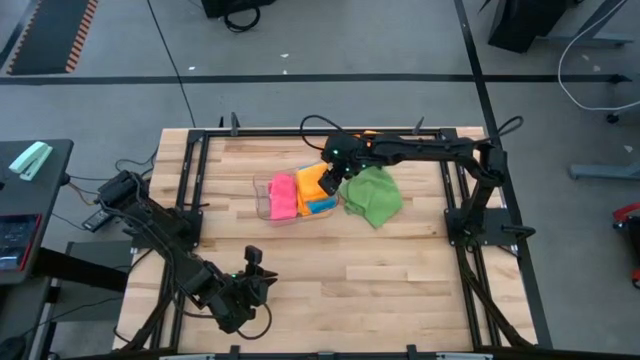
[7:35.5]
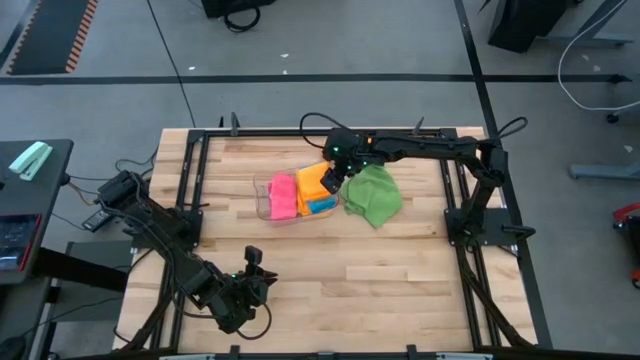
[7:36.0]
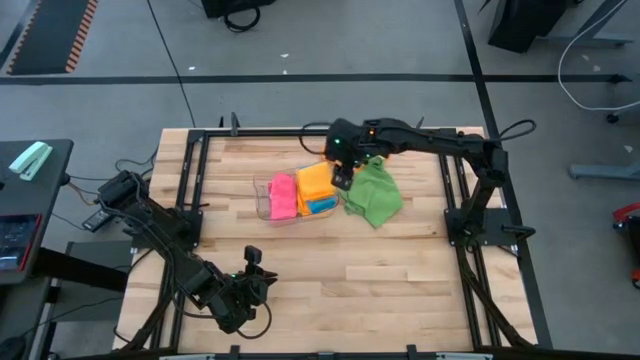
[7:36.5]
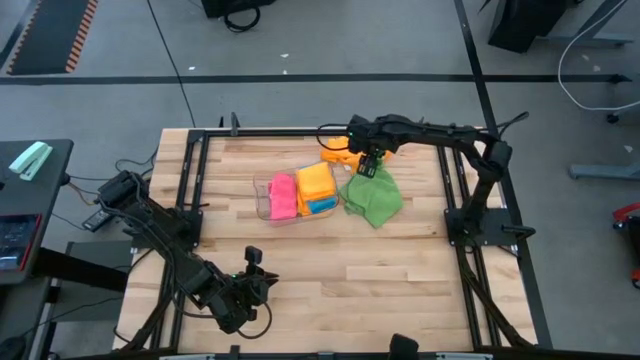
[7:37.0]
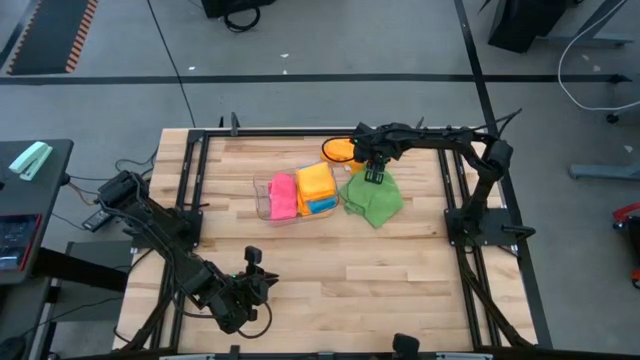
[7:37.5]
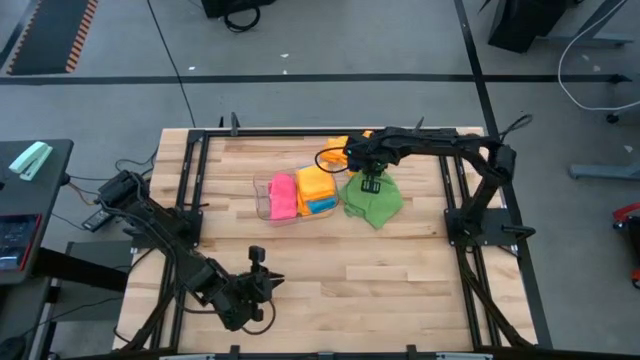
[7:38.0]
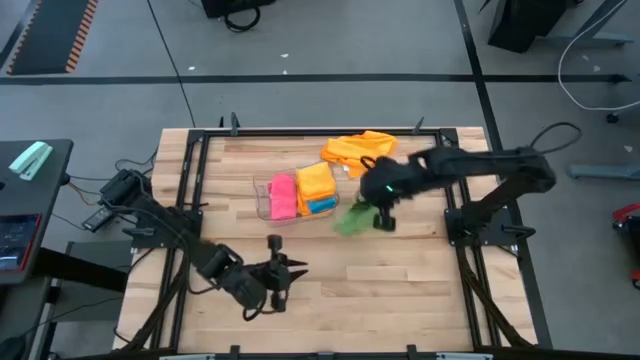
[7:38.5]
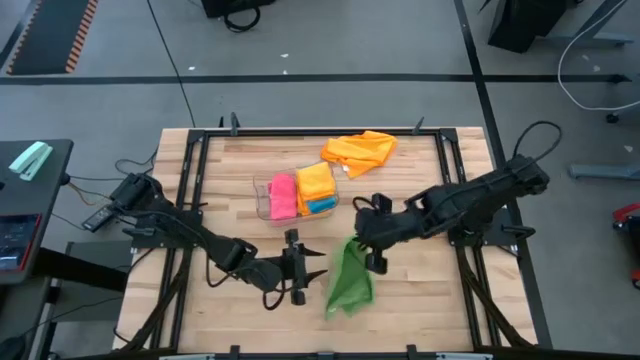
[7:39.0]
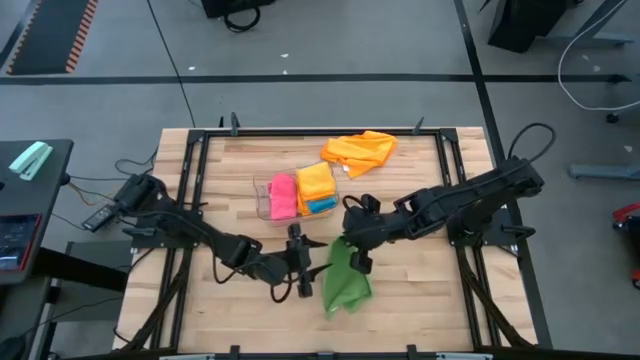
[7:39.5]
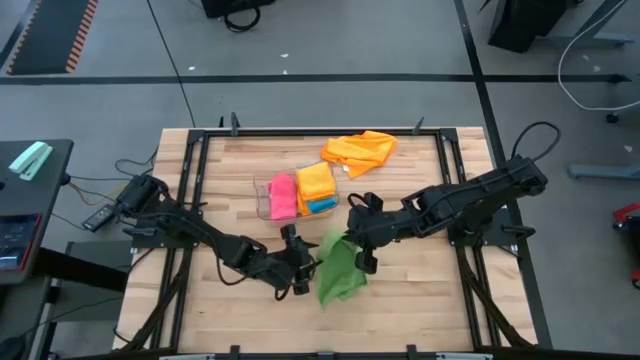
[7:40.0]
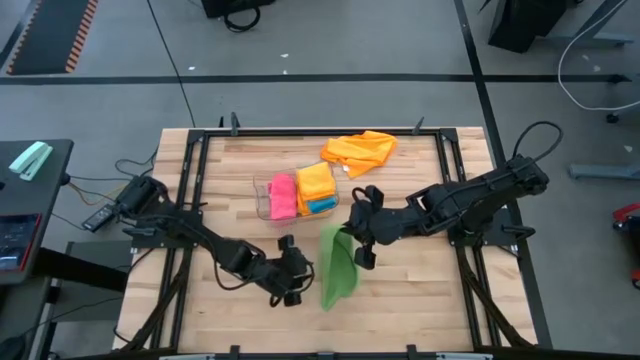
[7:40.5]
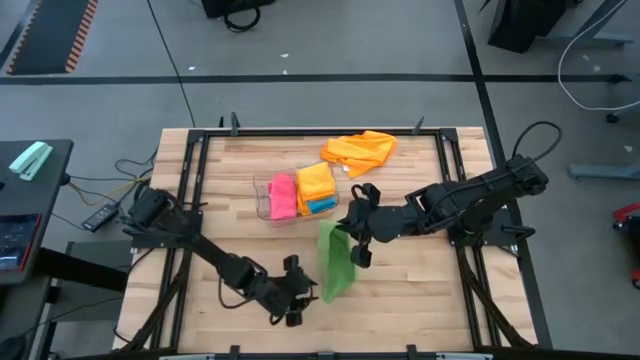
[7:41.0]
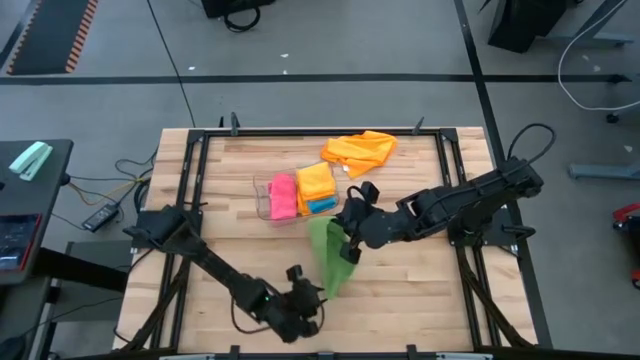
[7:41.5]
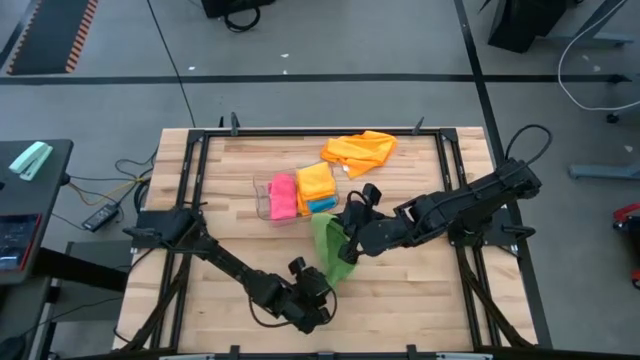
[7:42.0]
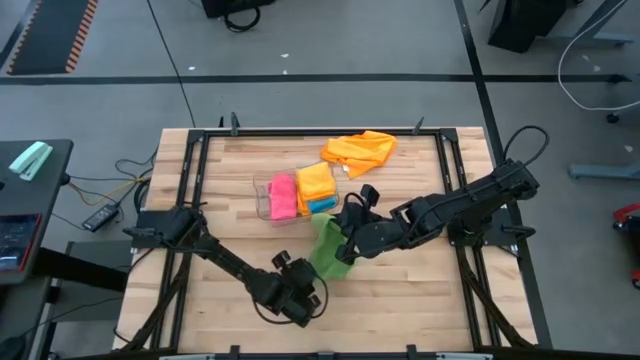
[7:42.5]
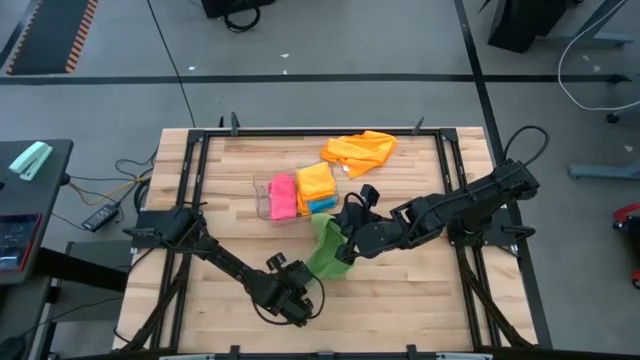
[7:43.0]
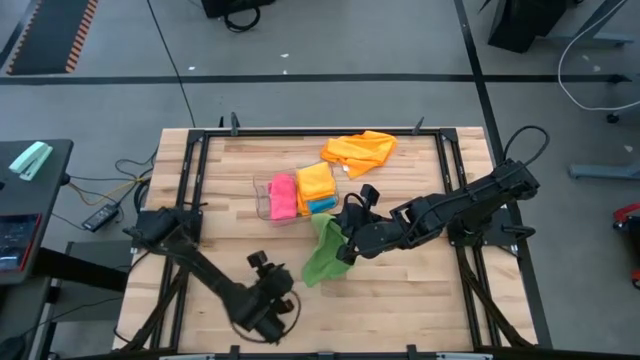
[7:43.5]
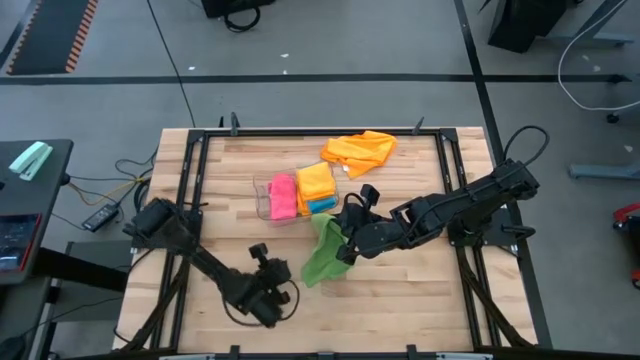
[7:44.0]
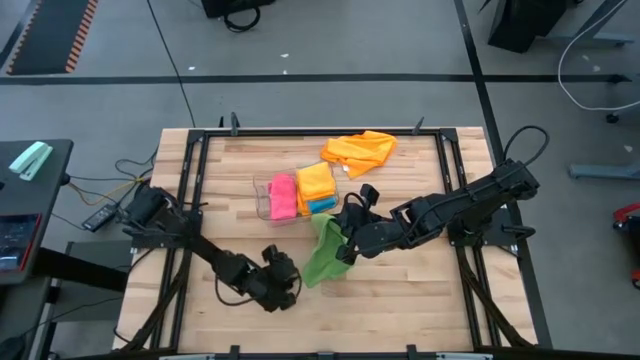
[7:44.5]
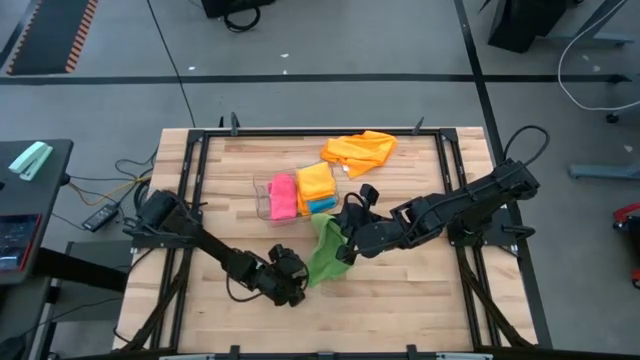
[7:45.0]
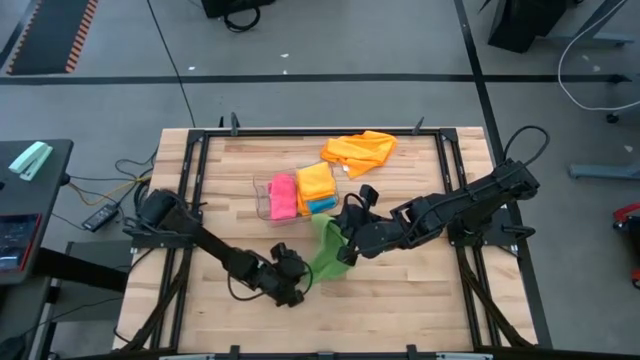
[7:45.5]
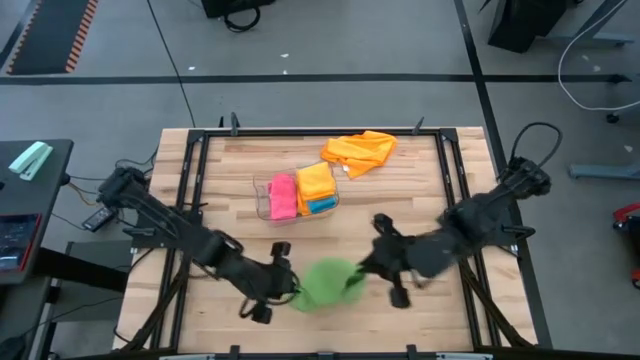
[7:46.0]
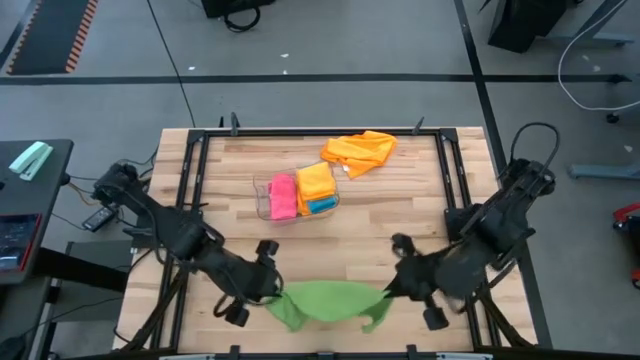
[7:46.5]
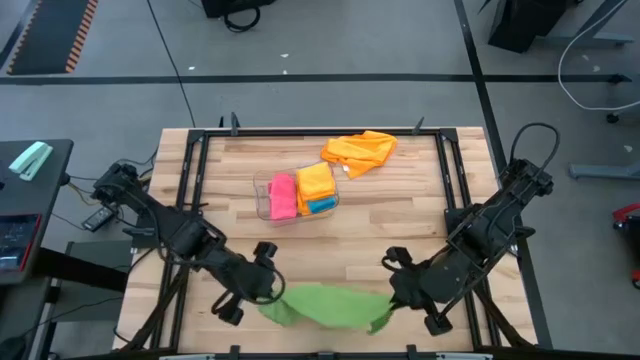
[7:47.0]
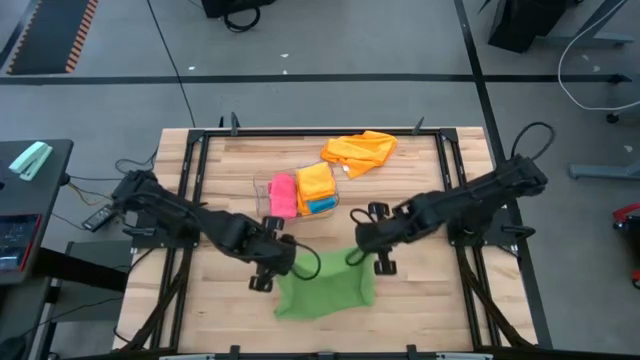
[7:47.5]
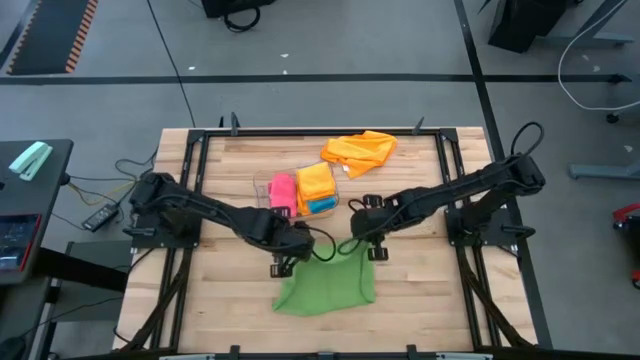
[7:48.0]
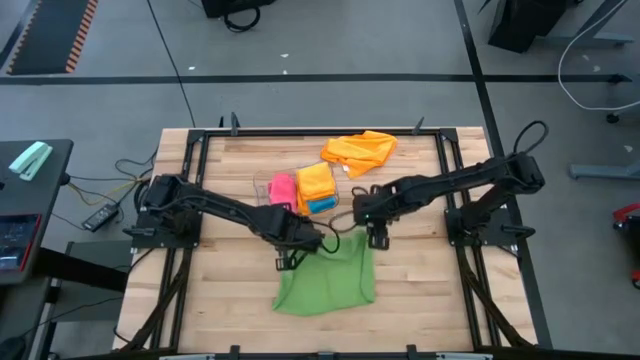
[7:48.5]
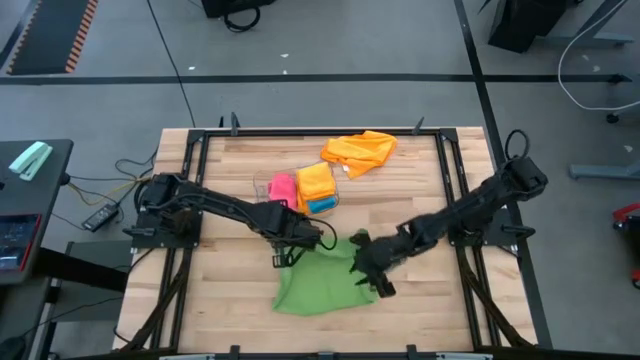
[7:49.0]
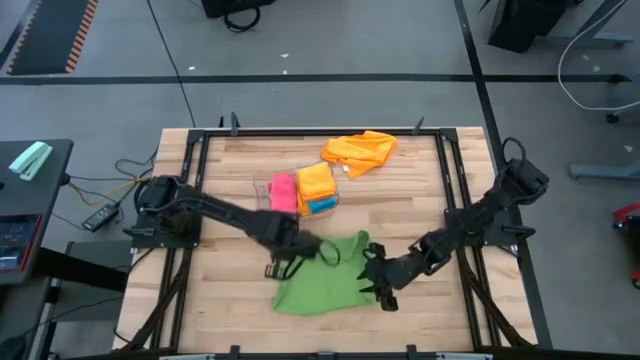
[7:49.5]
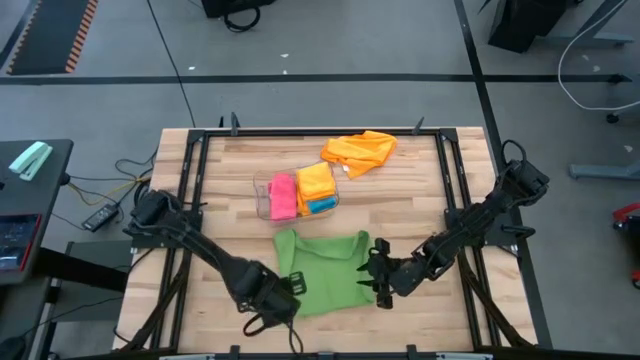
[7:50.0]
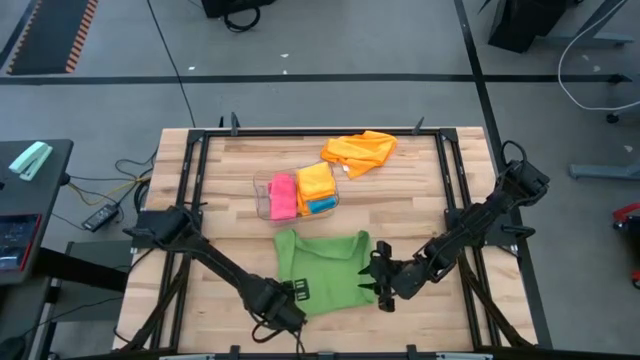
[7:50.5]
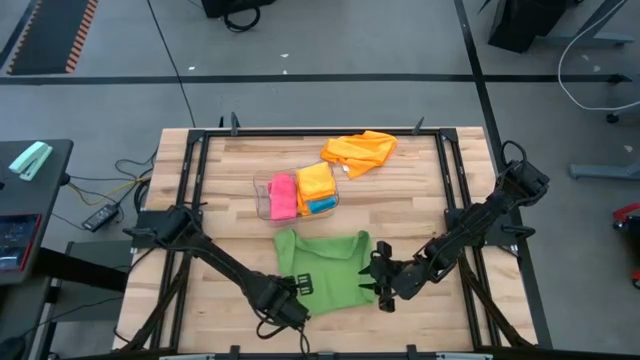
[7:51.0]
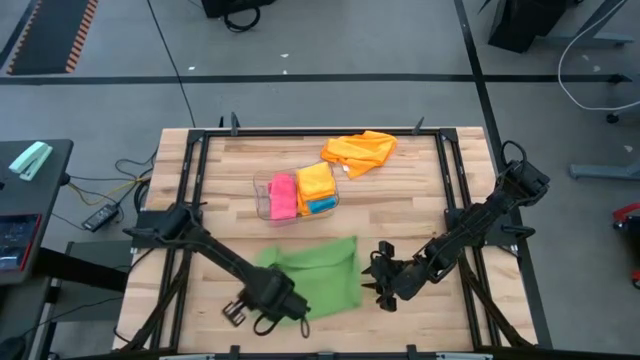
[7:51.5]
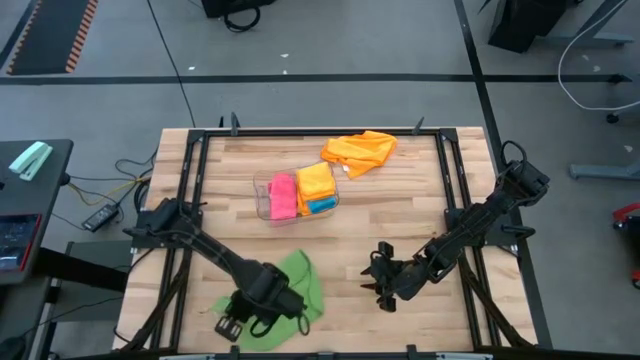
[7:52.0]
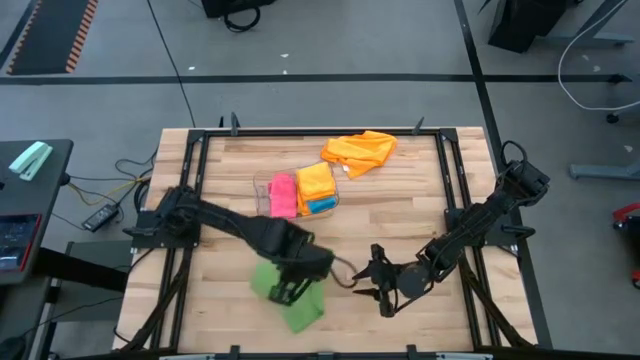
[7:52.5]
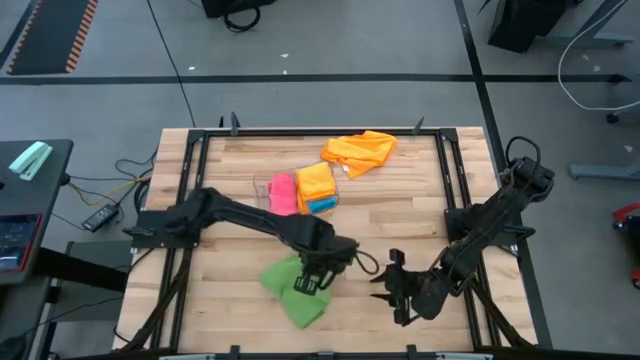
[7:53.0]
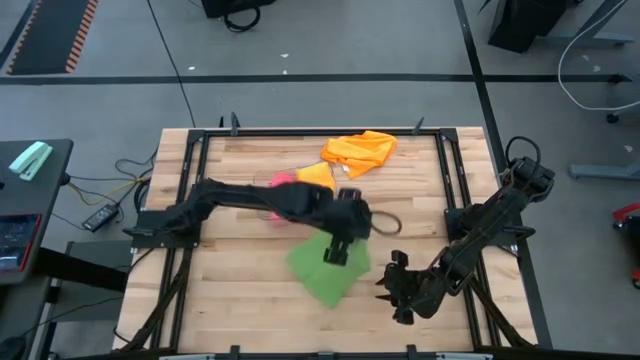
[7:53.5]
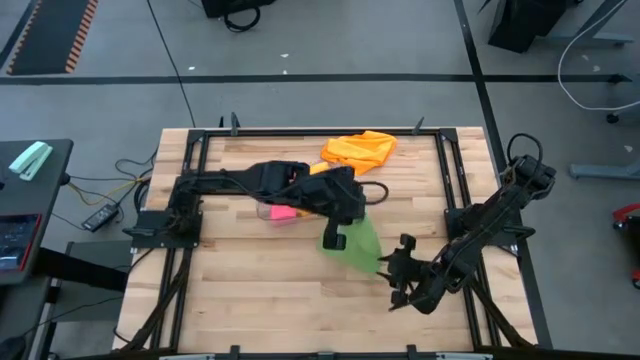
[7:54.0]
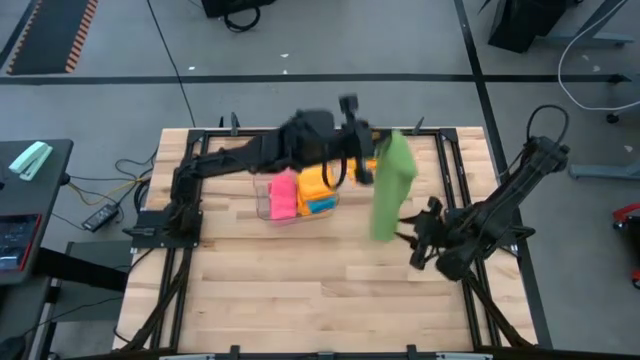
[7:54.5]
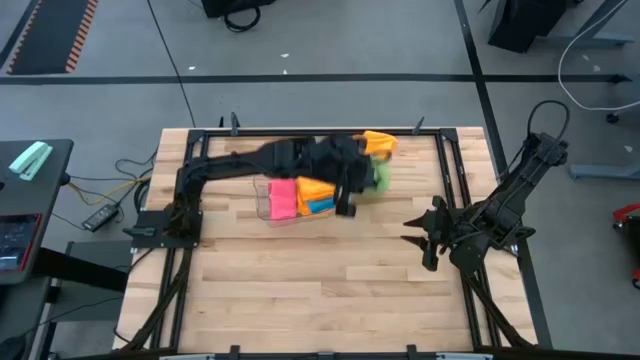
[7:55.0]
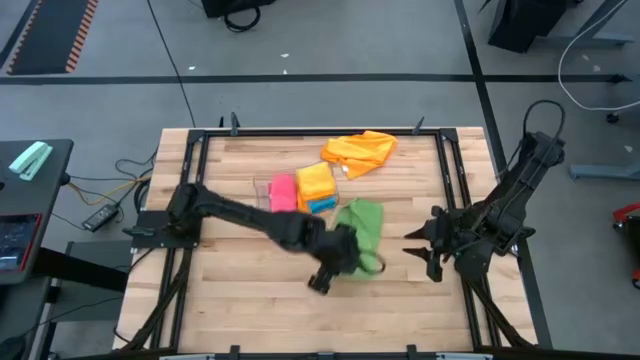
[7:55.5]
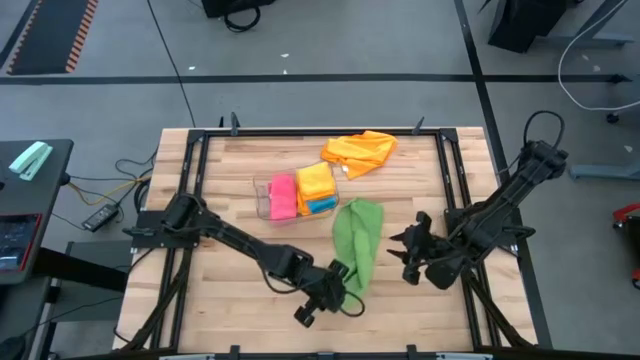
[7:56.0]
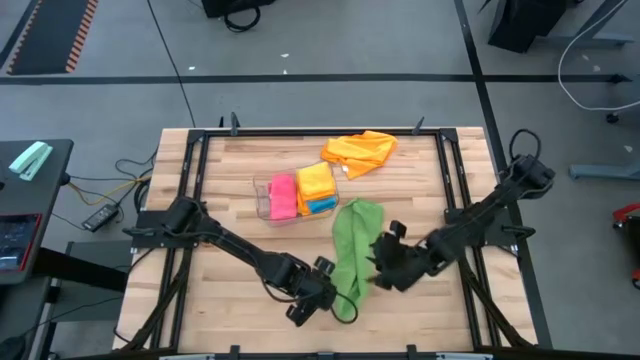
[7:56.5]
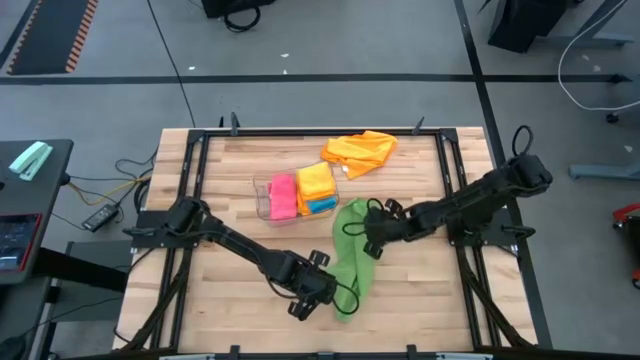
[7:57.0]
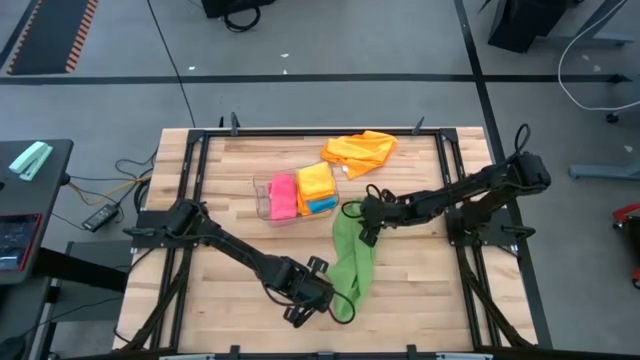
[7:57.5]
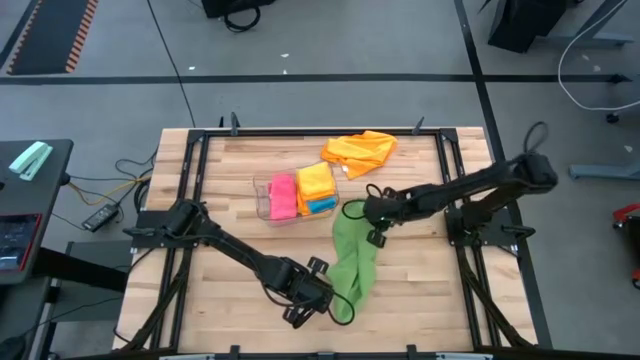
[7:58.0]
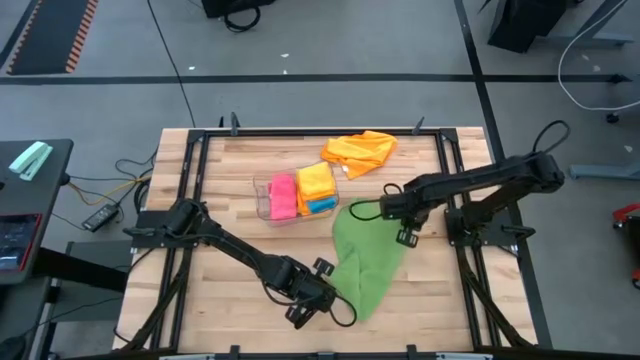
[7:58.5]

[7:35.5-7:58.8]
Task: Fold microfiber towels
Fold the green microfiber cloth
